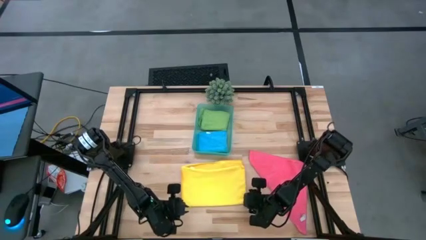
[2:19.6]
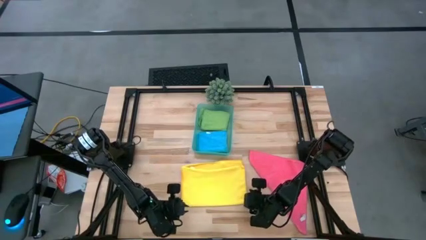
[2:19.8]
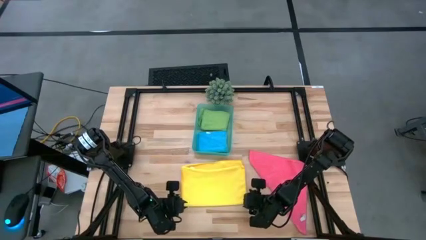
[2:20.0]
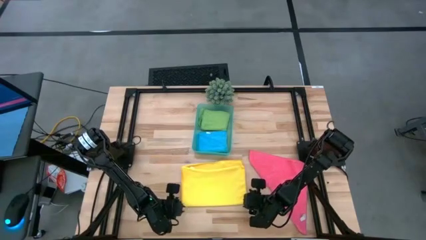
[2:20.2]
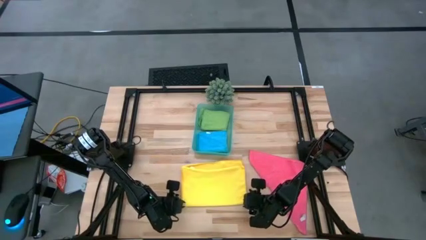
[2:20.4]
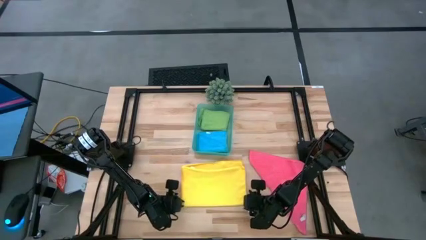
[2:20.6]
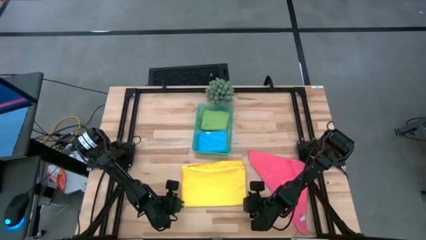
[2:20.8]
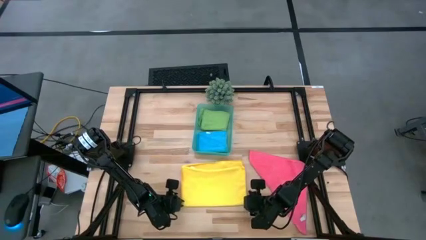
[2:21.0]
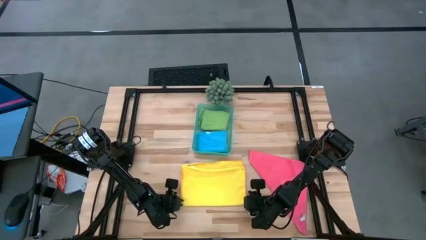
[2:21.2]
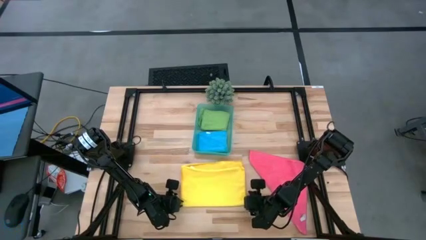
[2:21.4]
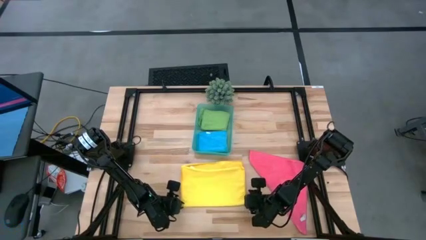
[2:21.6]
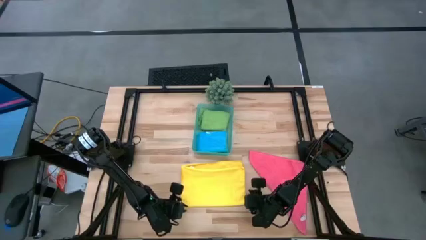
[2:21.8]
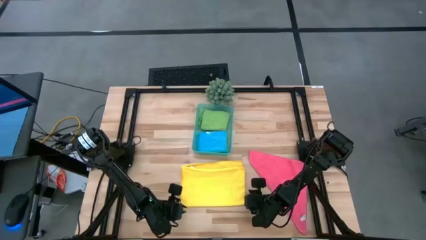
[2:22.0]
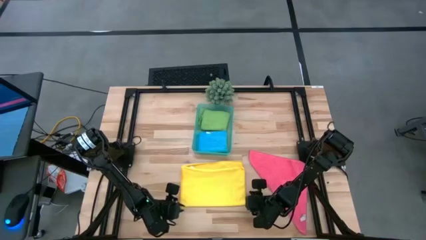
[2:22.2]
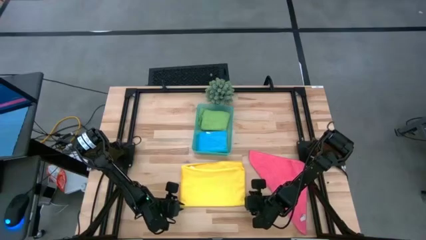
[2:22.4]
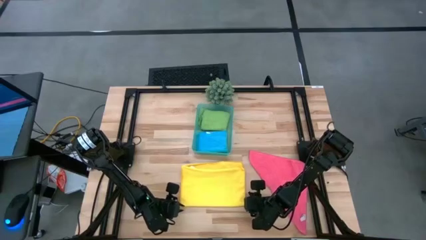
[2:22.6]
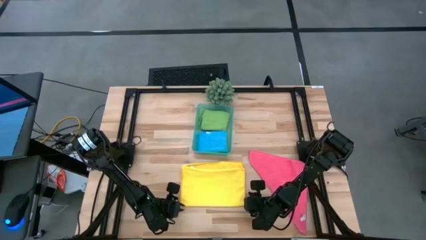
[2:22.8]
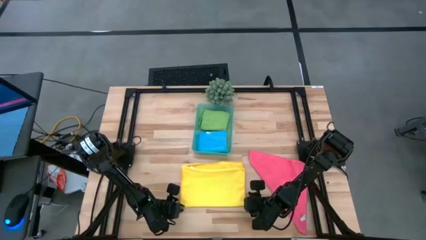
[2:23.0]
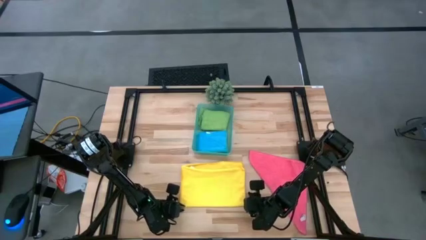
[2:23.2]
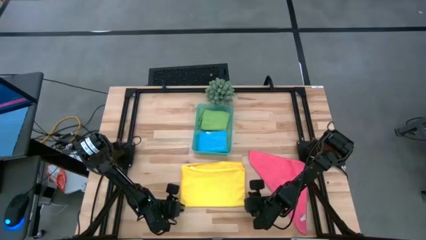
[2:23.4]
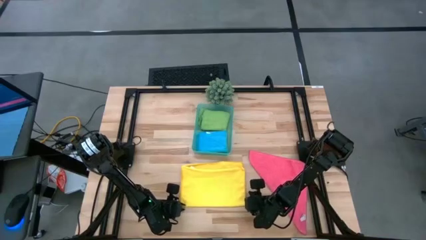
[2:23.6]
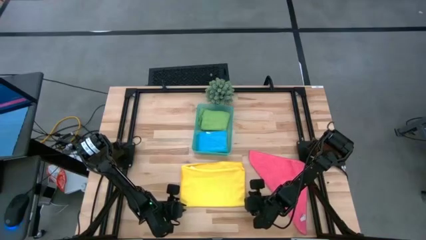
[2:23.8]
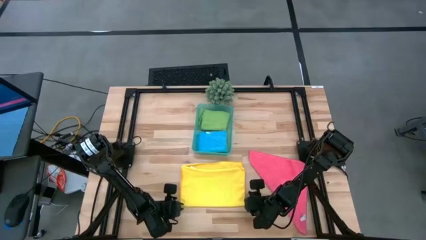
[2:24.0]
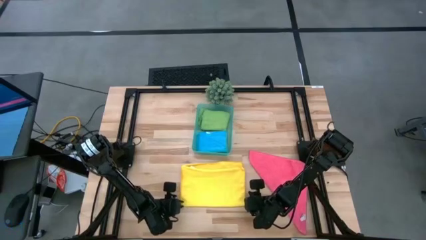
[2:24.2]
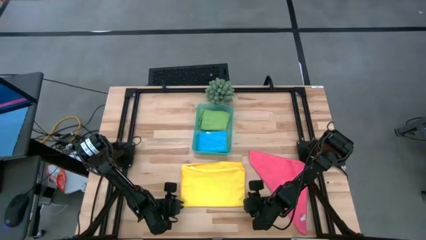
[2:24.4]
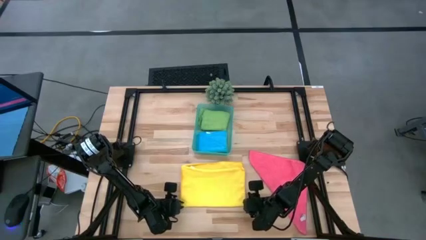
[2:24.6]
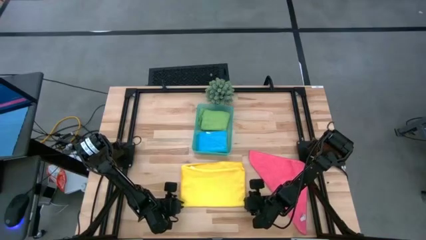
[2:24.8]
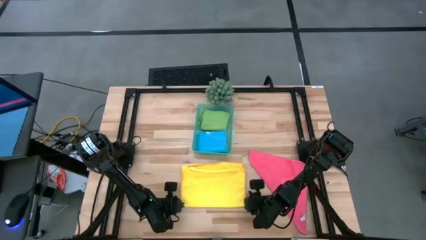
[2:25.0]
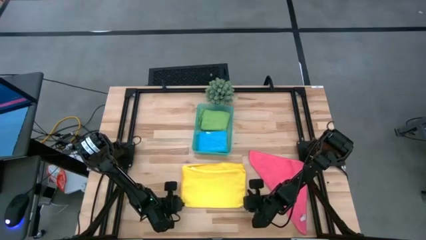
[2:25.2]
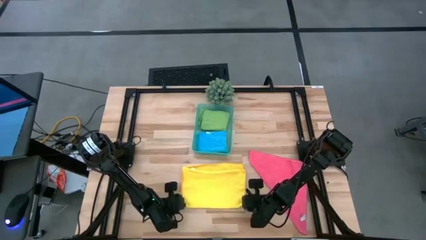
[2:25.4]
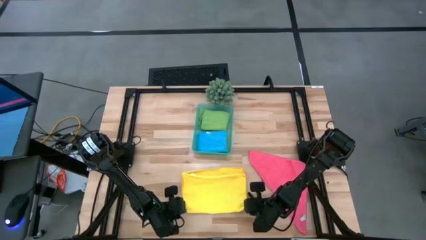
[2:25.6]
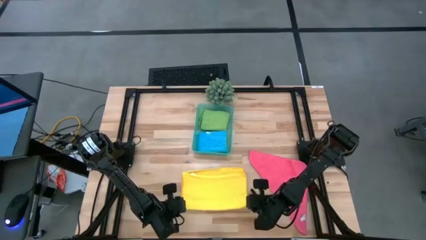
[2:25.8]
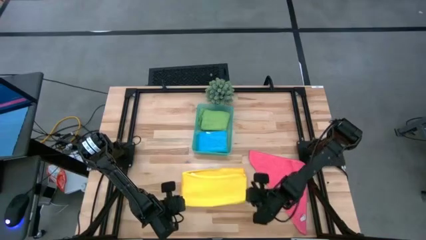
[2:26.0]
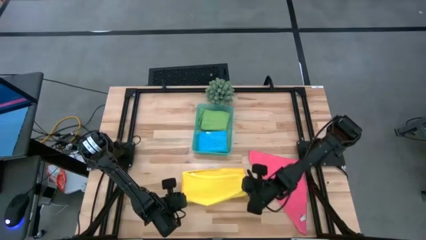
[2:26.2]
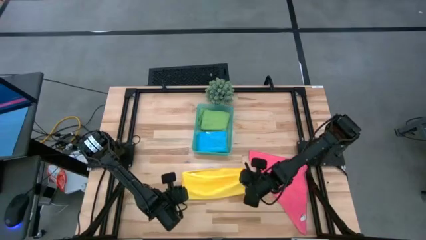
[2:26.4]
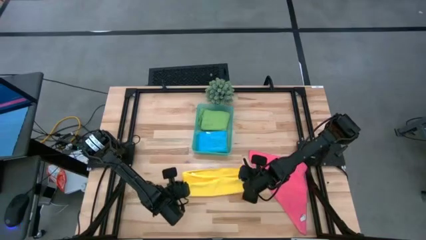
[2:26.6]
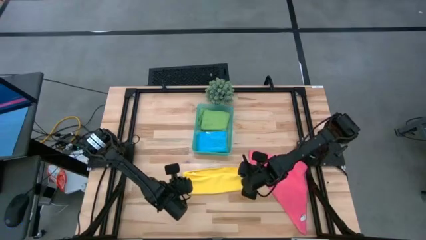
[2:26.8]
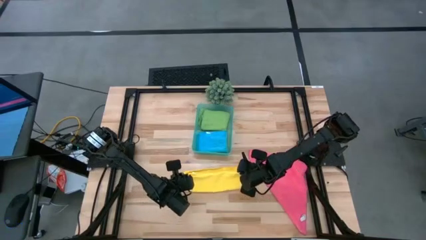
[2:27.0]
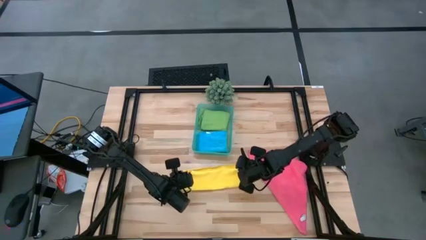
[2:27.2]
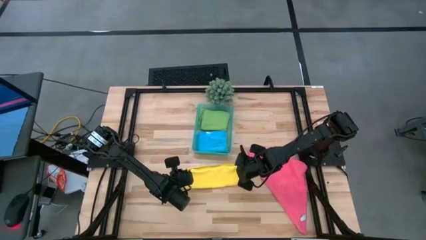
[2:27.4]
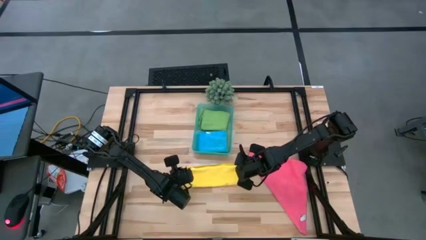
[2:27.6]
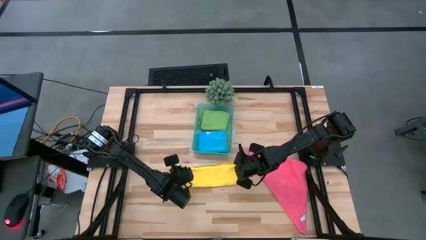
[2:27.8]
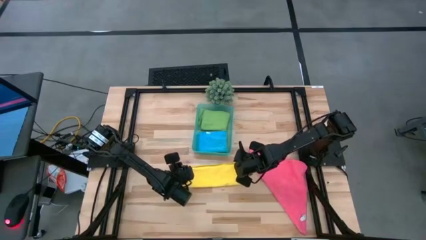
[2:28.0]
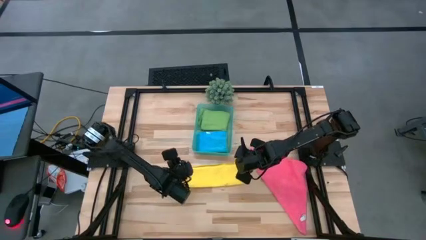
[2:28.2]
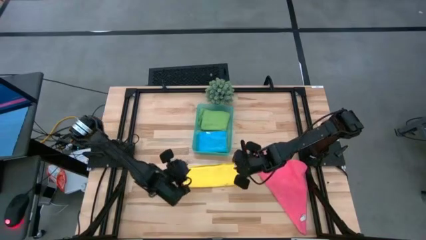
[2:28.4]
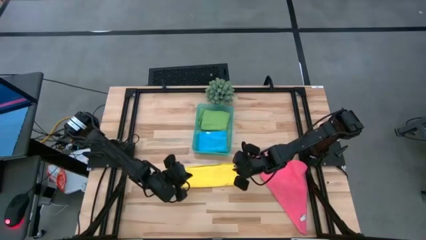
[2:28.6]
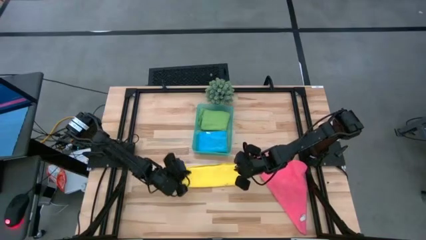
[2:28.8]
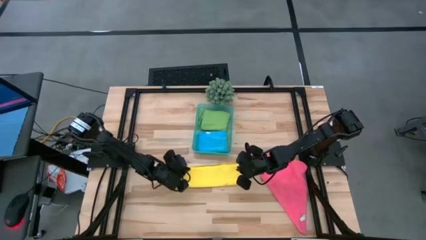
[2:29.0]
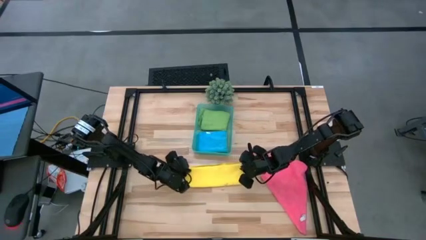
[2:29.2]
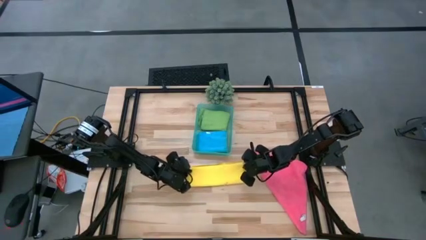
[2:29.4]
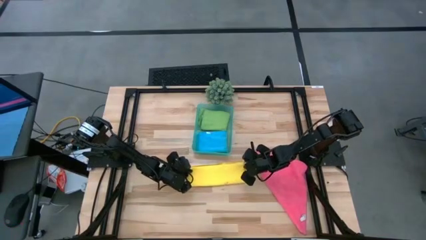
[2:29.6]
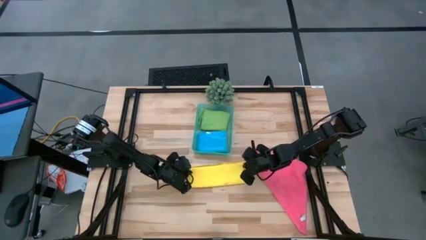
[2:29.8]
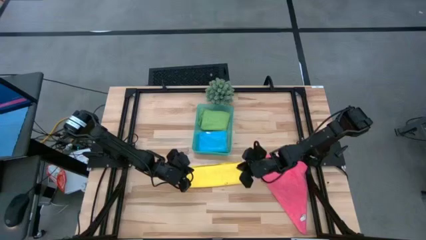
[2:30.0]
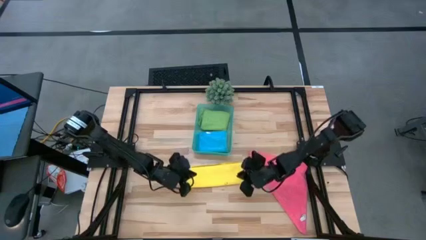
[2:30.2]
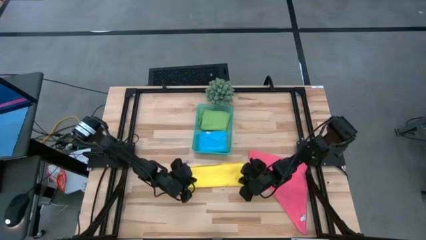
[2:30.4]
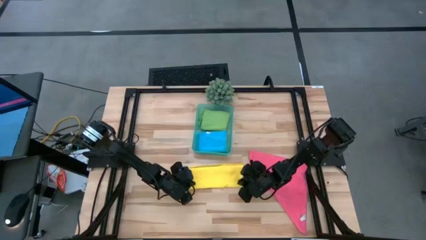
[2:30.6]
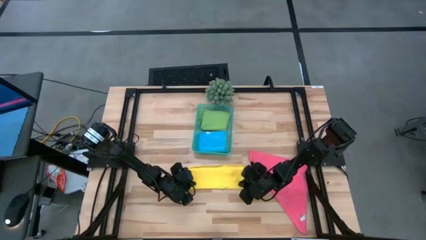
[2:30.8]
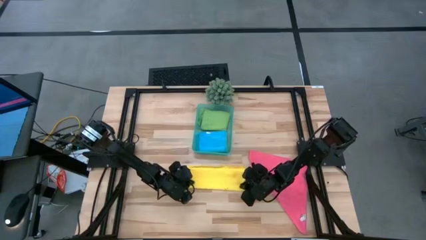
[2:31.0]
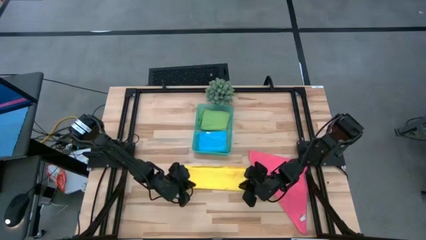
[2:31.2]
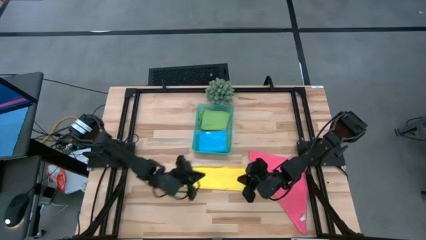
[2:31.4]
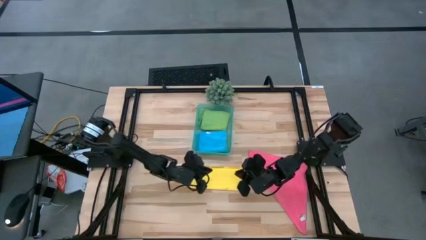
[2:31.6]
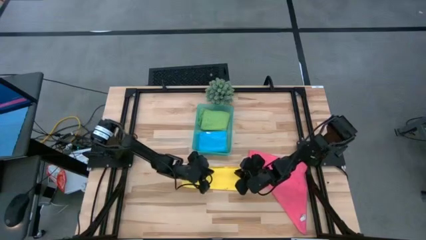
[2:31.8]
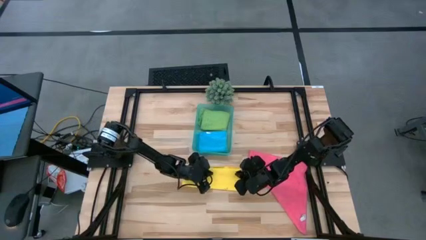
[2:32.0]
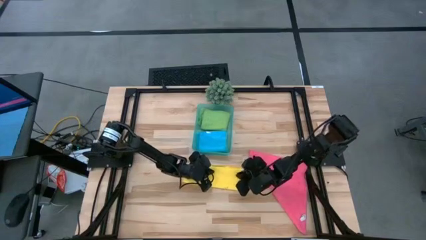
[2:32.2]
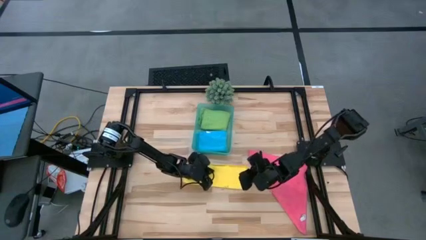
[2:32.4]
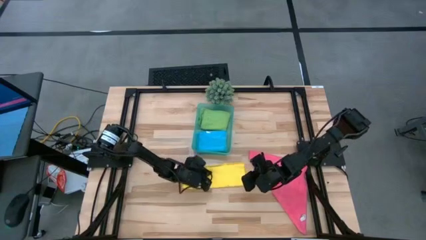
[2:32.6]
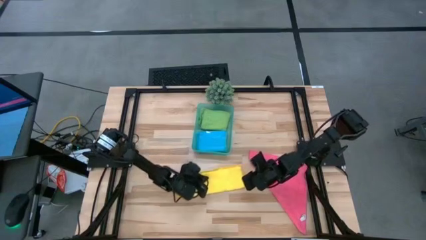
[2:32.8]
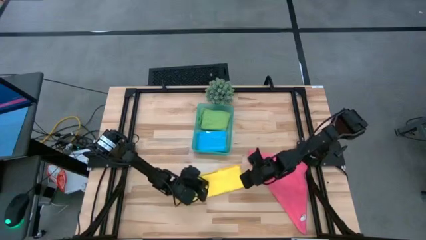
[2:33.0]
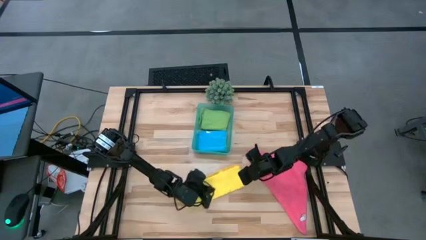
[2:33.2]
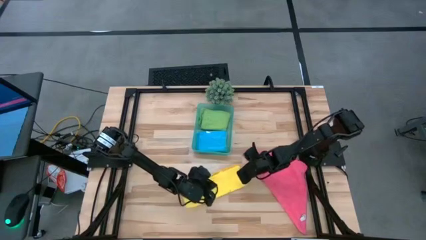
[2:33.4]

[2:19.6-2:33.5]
Task: Fold microfiber towels
Fold the yellow micro fiber cloth

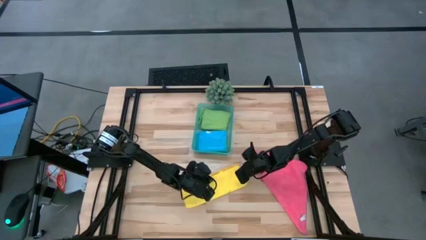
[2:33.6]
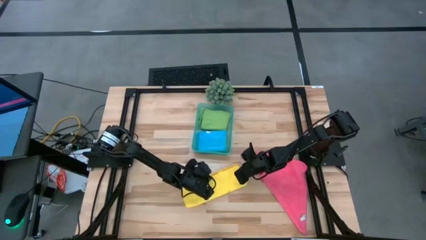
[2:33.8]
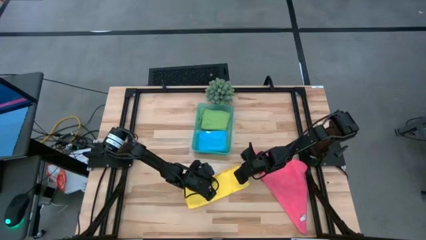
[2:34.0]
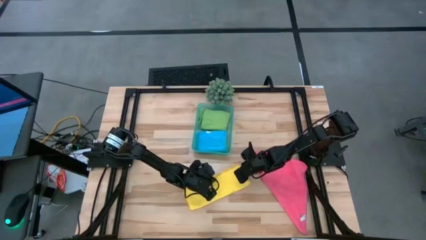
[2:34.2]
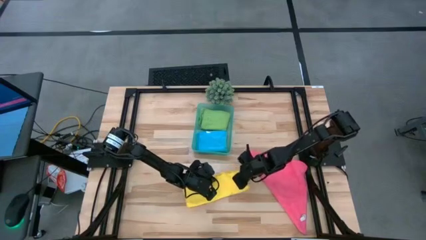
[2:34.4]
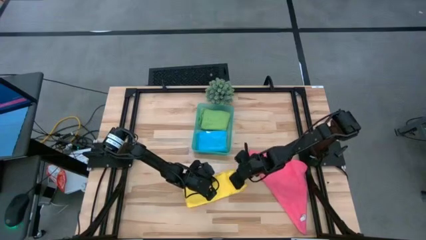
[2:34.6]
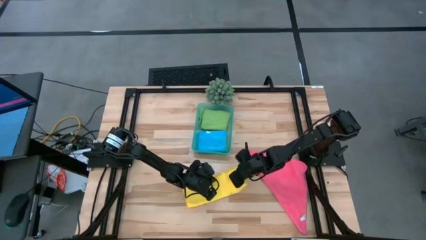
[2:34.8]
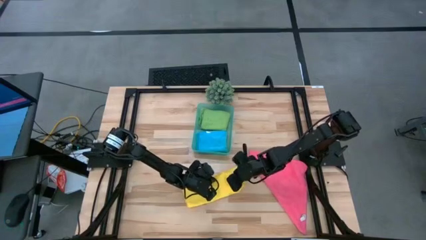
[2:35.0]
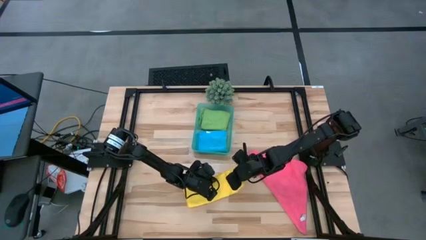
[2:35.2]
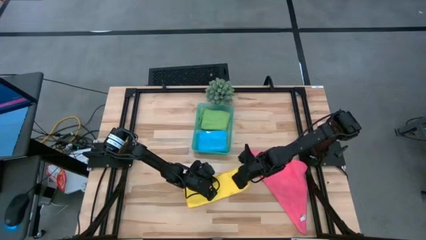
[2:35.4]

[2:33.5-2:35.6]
Fold the yellow micro fiber cloth
